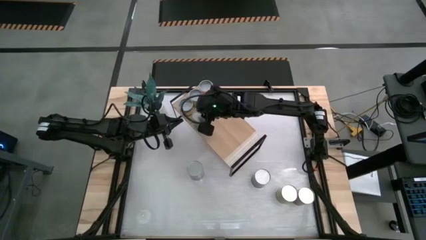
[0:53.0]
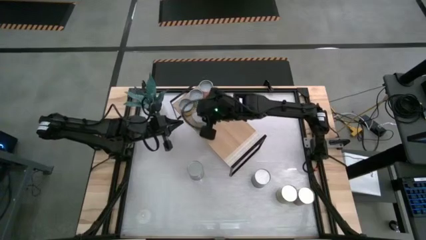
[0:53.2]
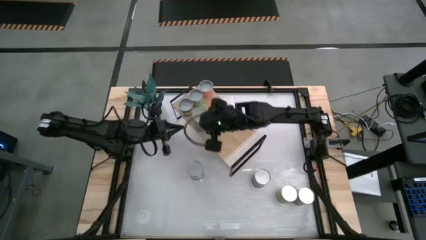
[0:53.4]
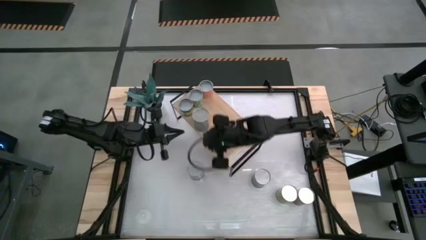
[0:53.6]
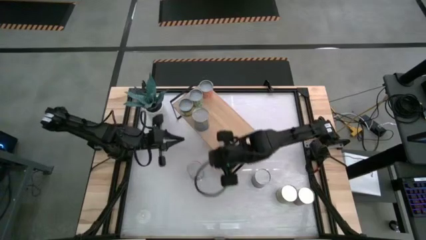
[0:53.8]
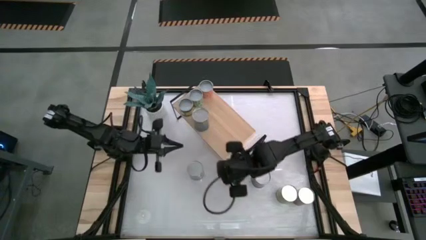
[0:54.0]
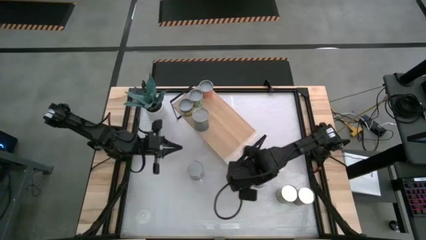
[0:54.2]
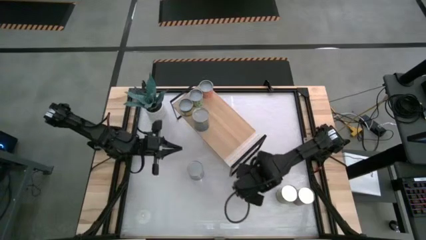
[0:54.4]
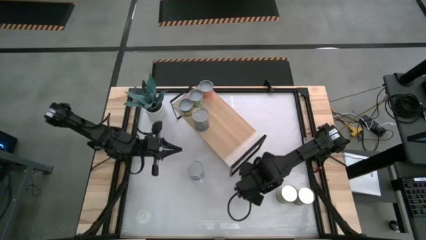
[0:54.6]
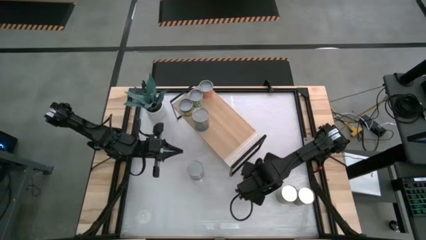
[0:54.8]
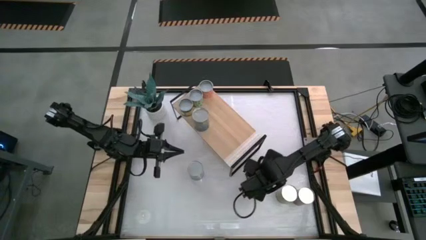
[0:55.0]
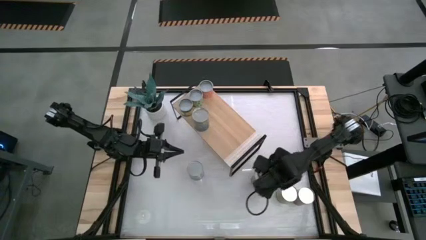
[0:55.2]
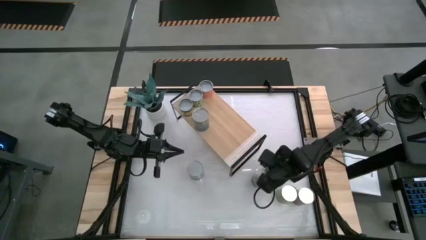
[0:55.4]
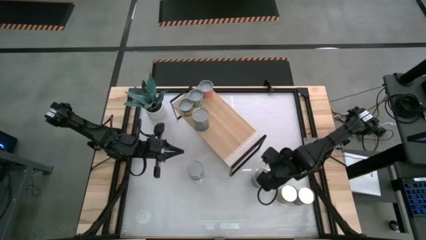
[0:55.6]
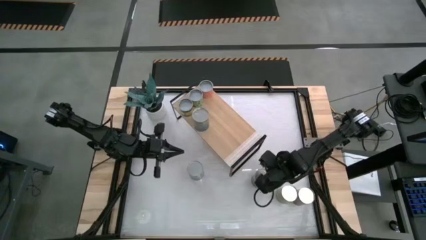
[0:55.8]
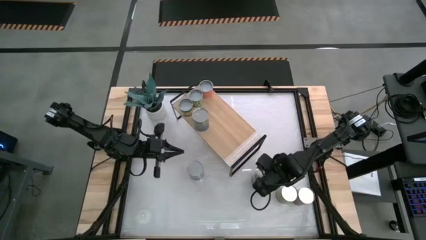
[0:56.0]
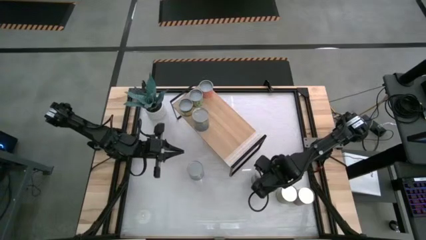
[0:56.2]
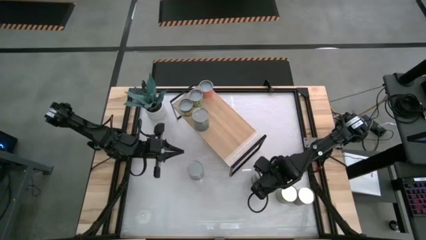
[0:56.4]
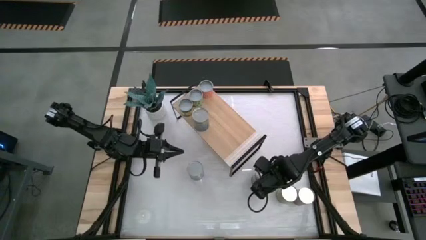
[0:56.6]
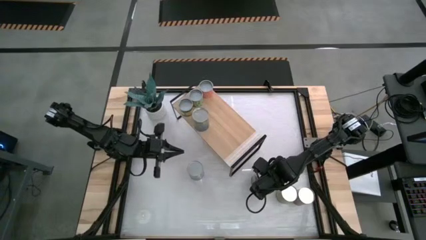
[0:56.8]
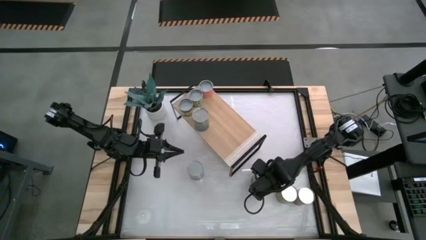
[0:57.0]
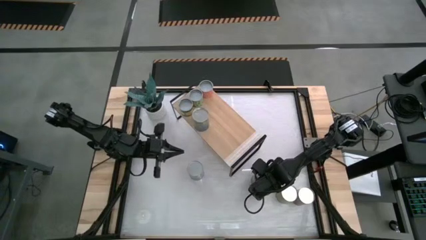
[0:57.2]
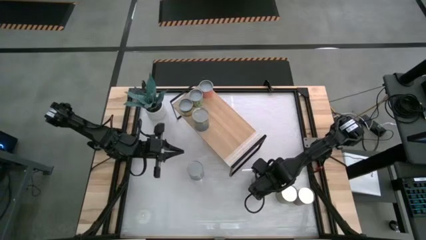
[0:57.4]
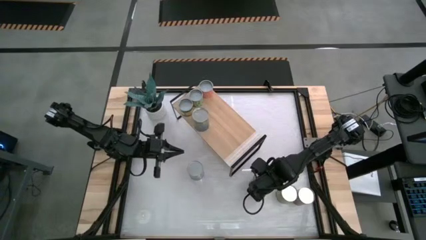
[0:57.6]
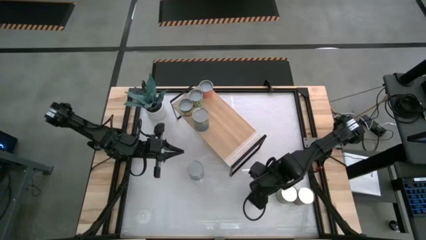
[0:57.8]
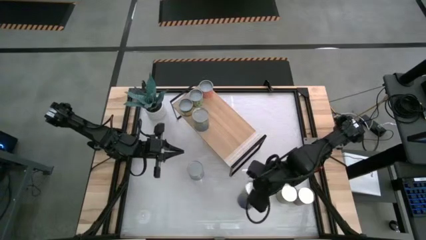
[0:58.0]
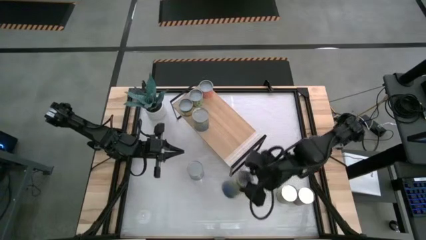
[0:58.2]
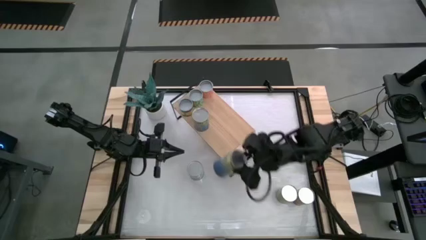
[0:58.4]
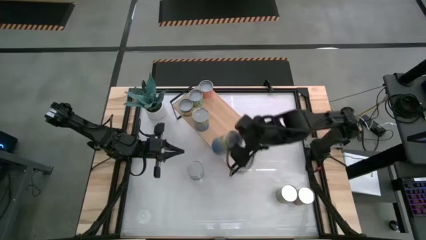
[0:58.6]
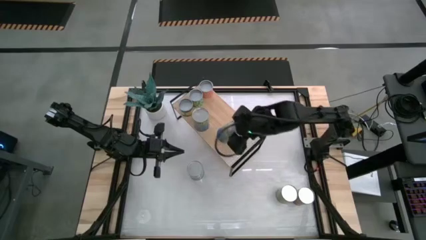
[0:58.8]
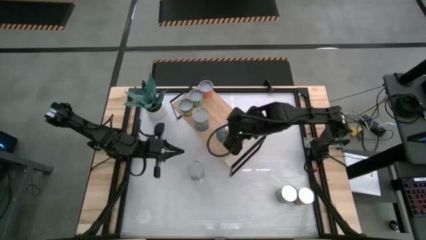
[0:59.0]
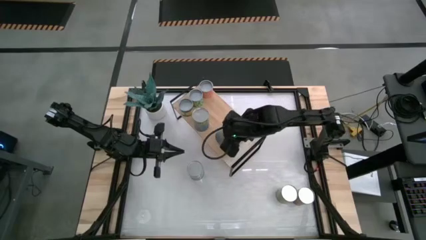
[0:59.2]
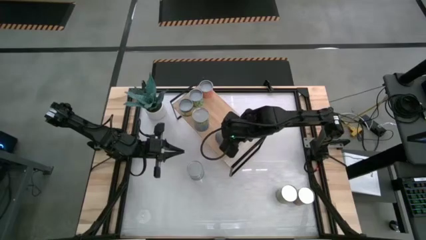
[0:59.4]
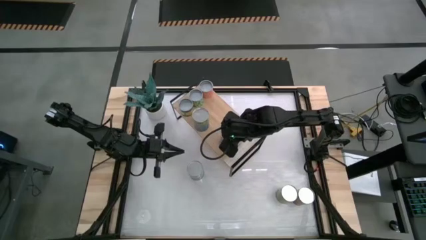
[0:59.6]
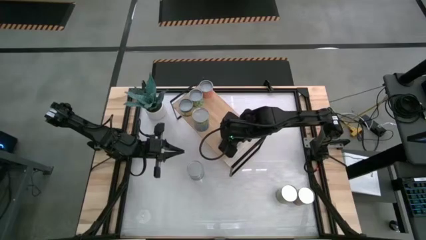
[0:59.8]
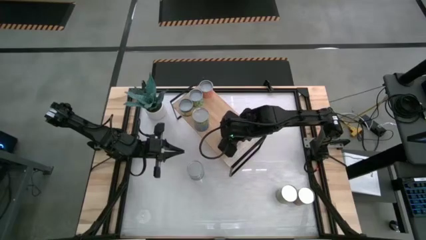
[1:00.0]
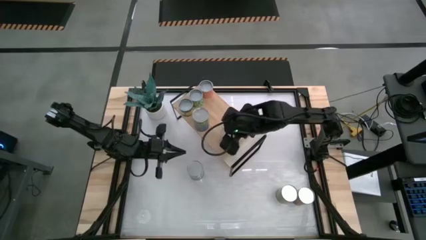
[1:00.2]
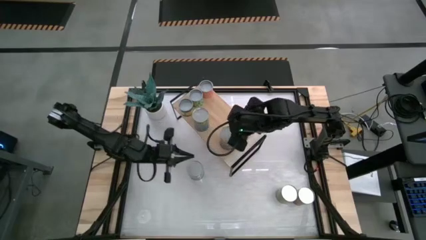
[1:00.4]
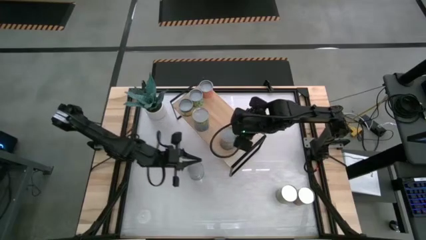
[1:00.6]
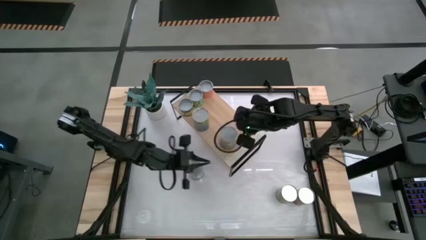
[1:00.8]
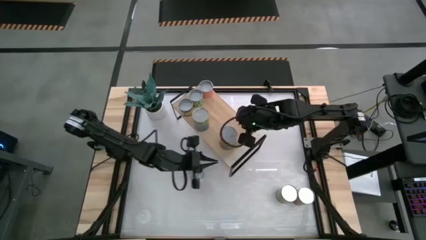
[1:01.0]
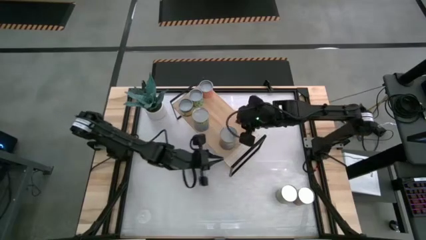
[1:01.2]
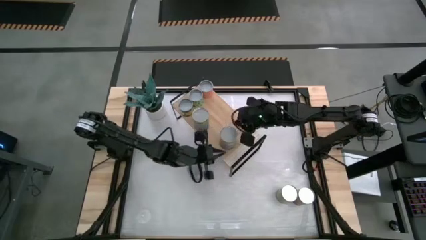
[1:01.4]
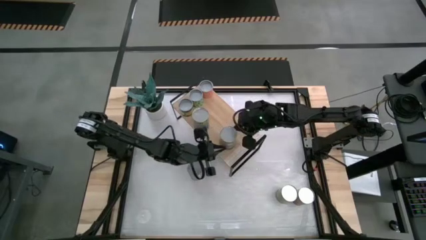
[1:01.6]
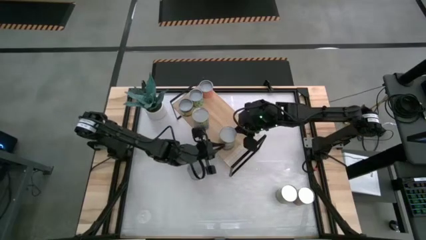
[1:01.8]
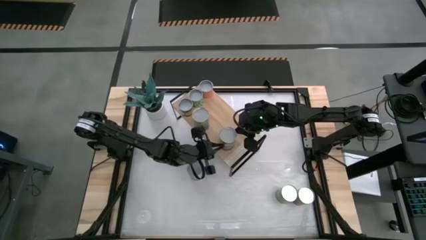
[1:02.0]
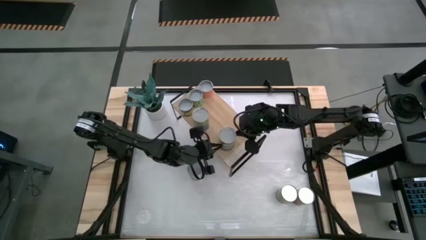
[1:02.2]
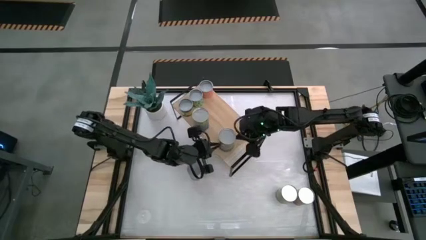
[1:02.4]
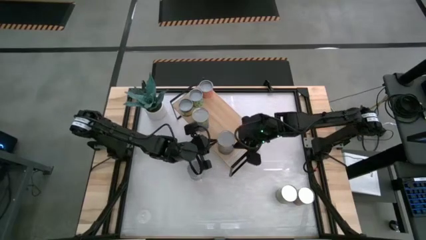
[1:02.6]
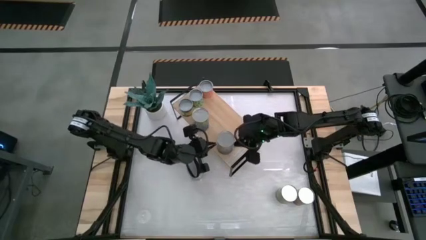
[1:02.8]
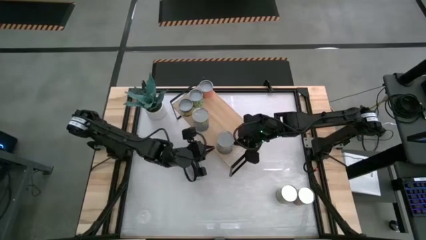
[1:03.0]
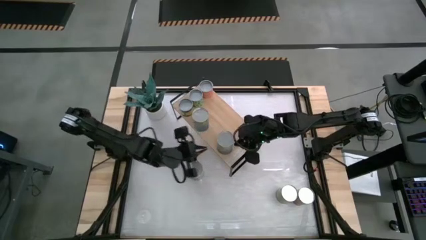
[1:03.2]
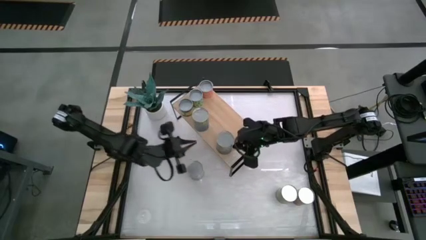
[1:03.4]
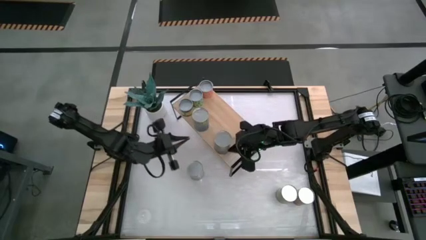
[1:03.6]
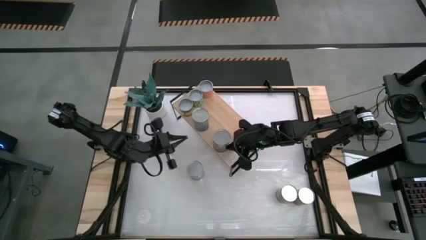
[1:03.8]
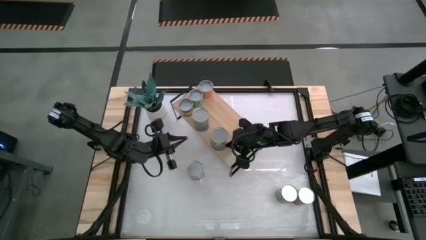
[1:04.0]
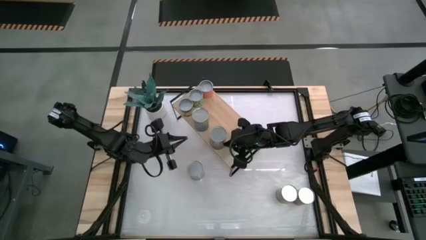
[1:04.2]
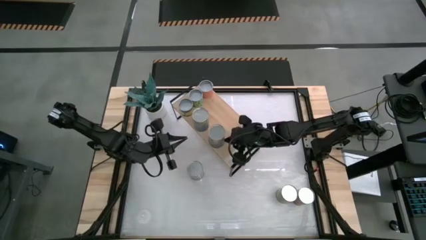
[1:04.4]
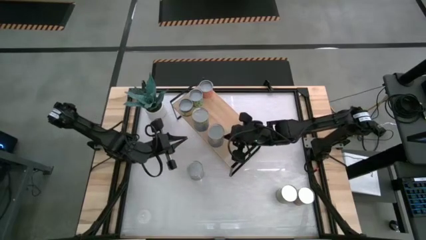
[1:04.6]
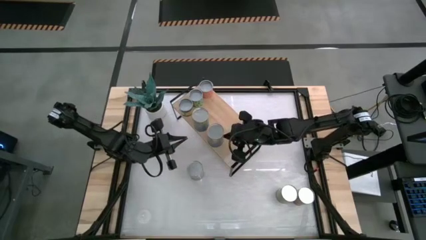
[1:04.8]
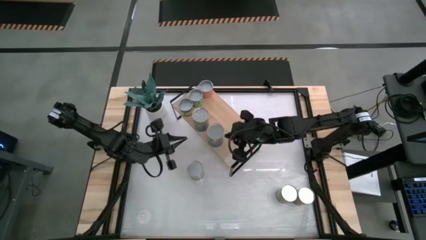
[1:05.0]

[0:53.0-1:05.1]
Task: Pick and place cans onto a shelf
Put the canned peas on the shelf

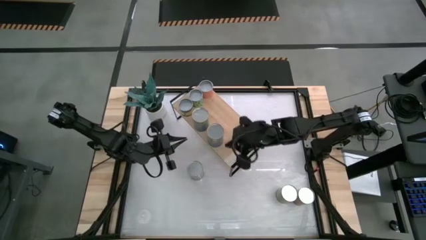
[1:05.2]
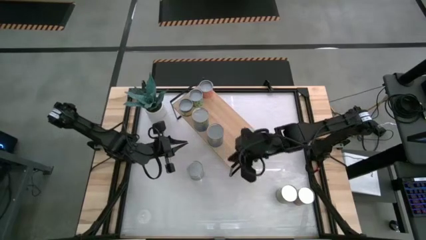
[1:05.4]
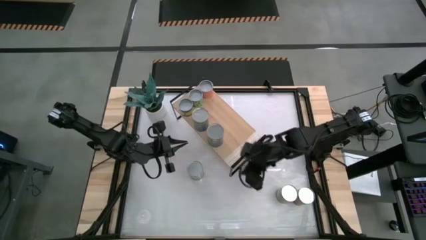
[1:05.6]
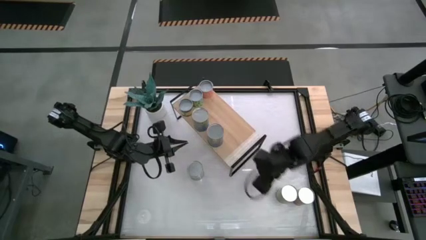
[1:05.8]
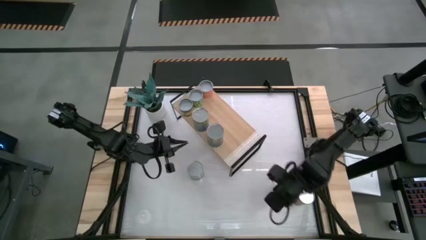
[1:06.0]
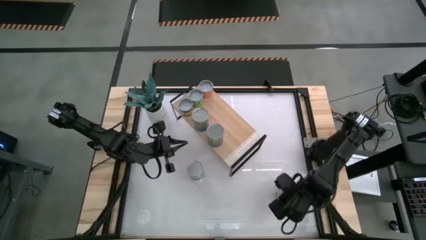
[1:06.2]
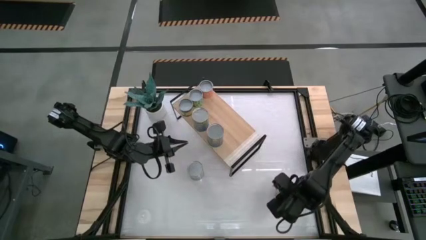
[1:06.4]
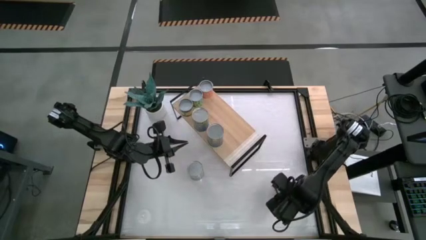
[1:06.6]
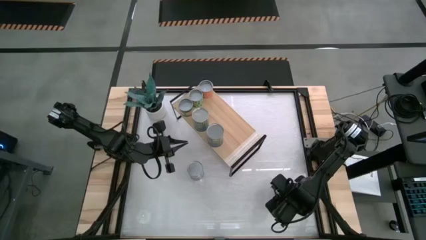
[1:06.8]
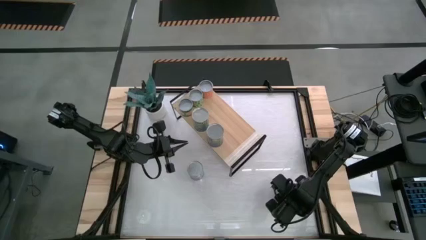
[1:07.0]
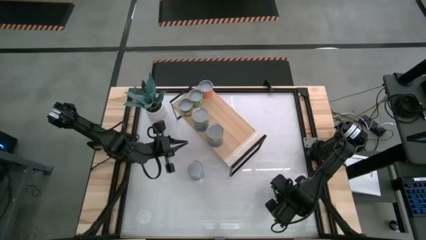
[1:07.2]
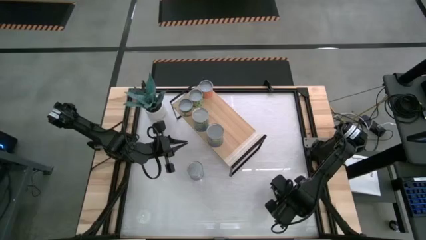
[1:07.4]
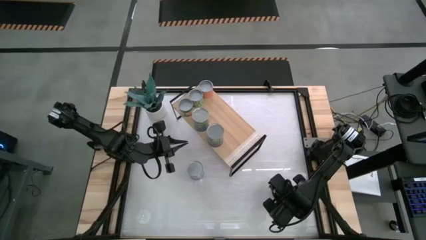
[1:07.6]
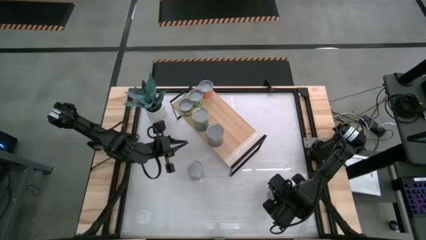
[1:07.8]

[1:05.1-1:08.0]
Put the canned carrots on the shelf
